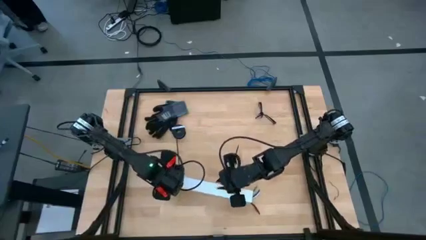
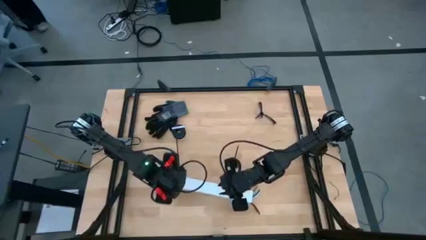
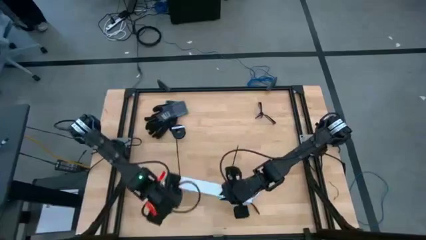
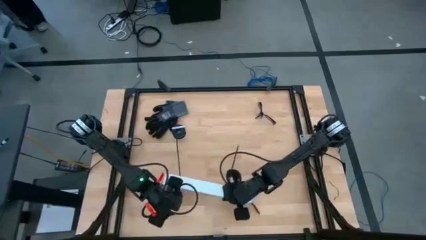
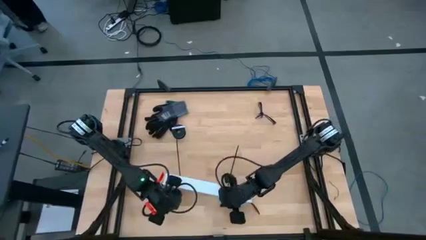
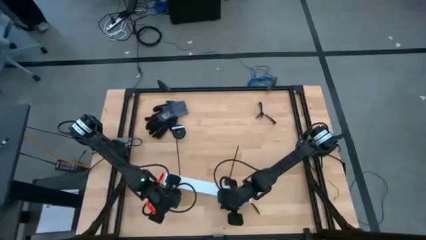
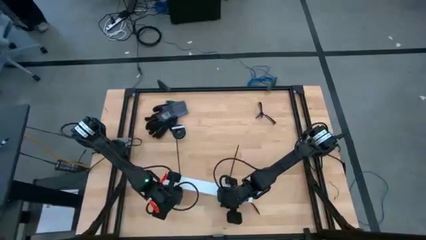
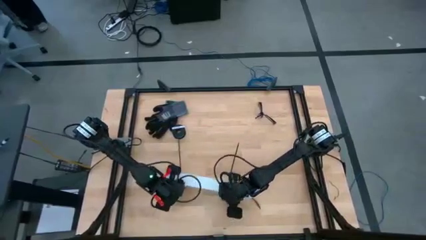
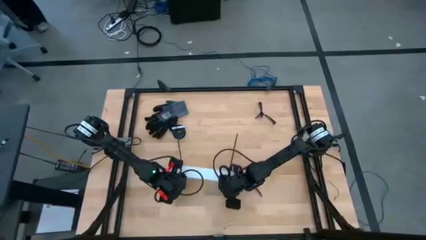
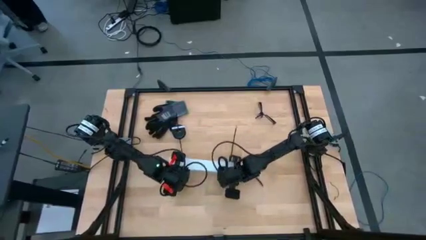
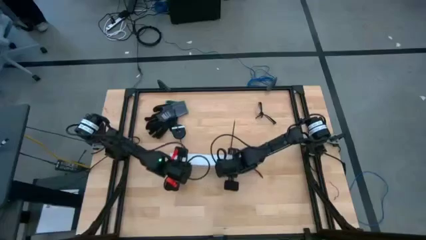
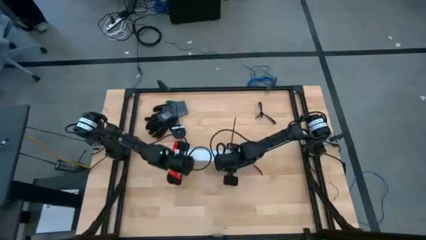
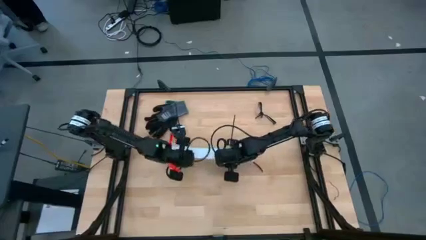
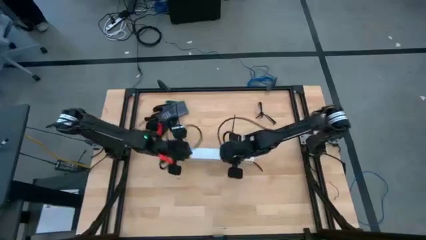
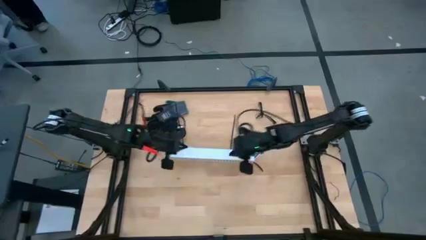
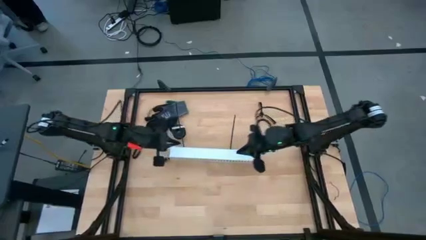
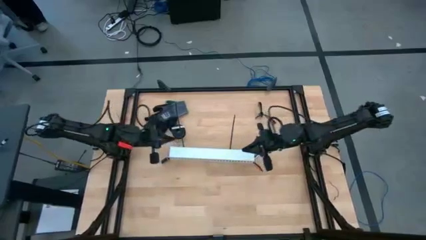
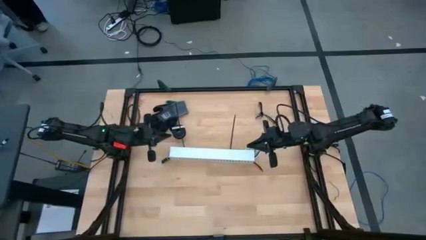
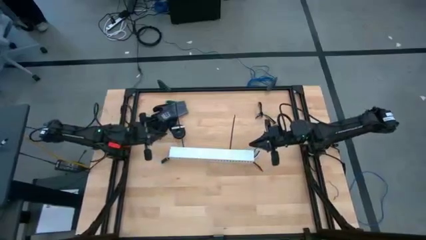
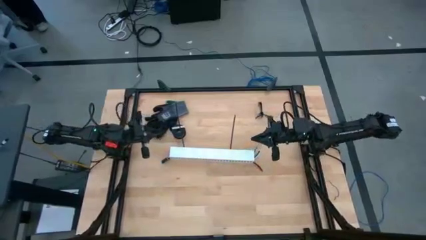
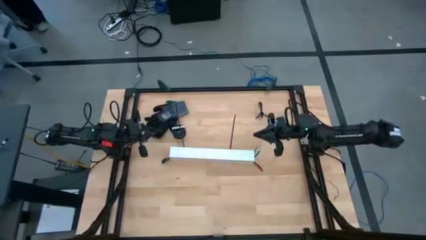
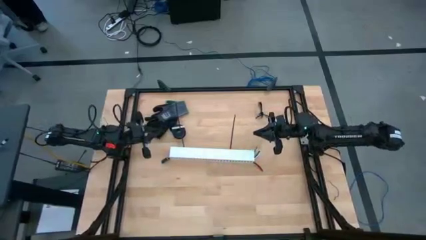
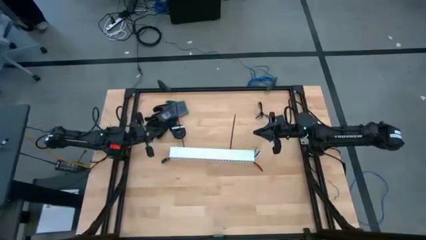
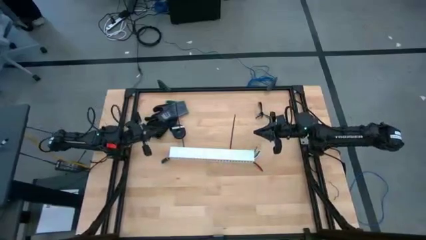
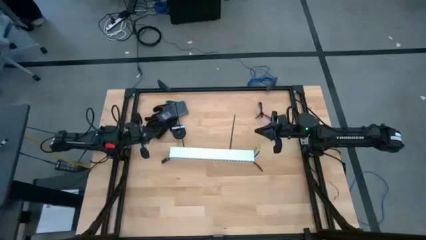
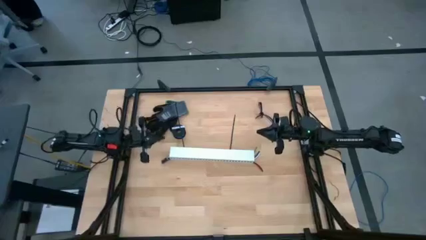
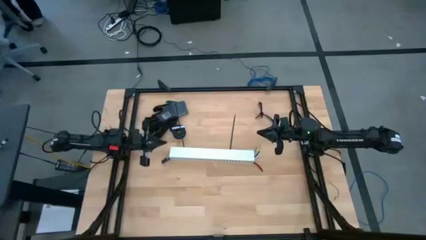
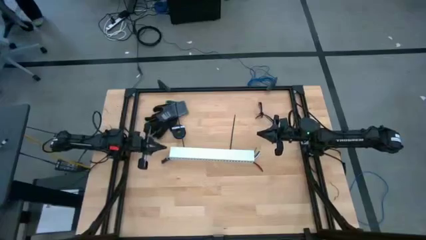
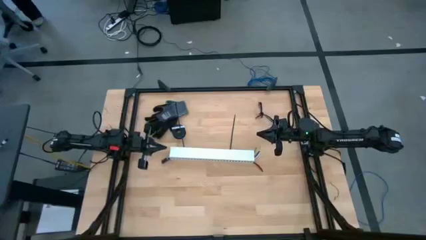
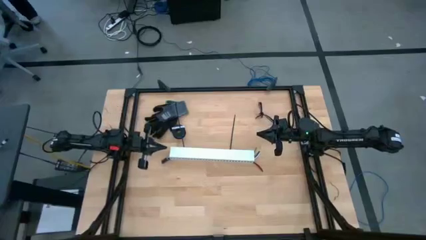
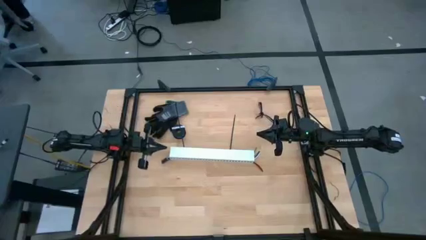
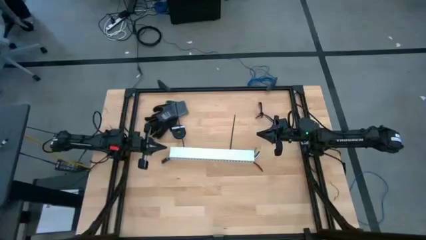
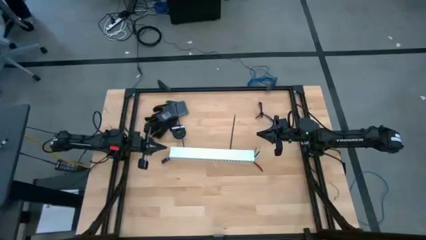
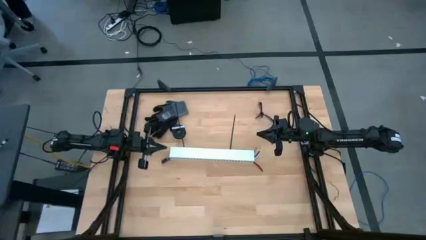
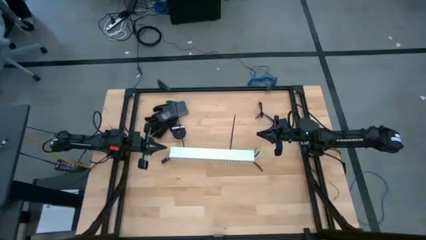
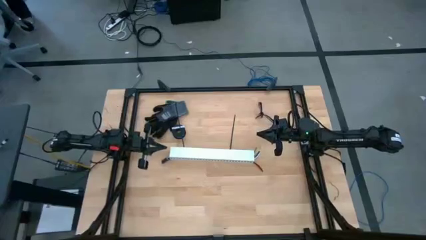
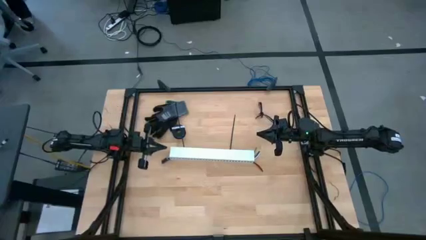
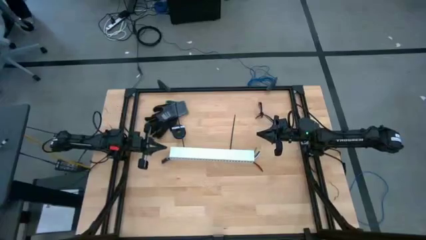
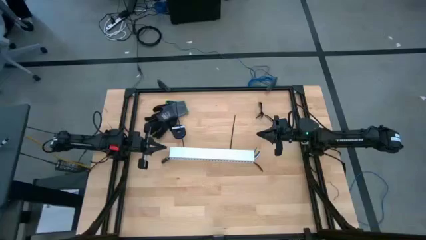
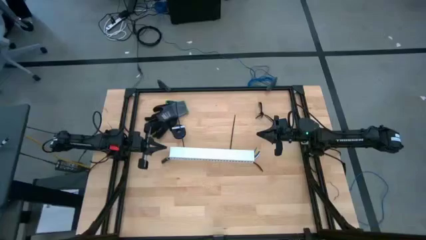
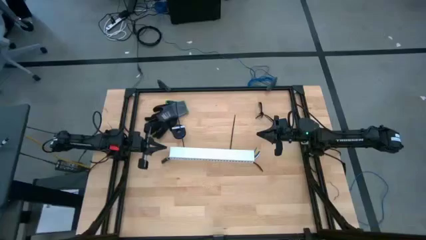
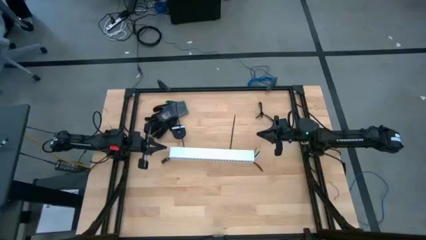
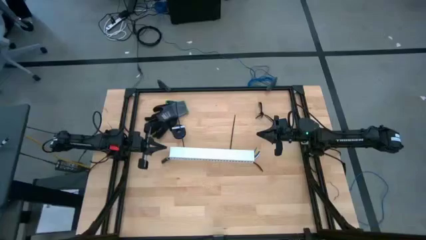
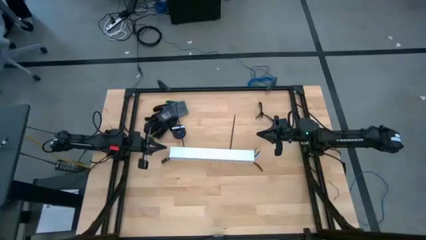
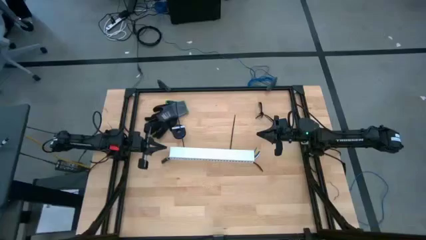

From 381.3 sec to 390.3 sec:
Task: Ziptie cables
Return to Home Position

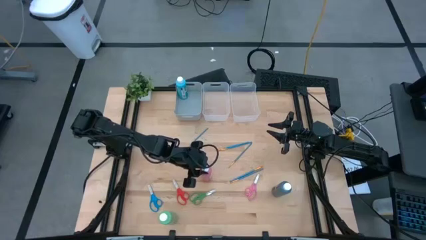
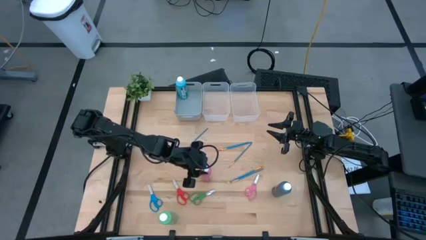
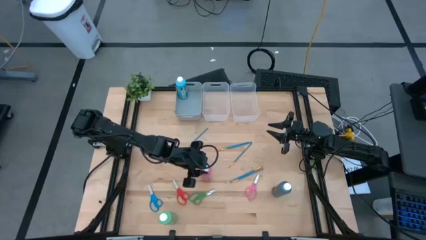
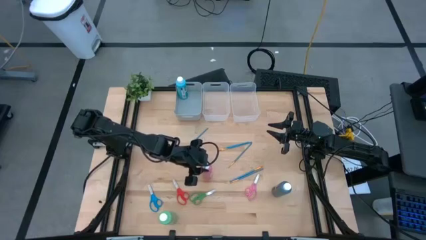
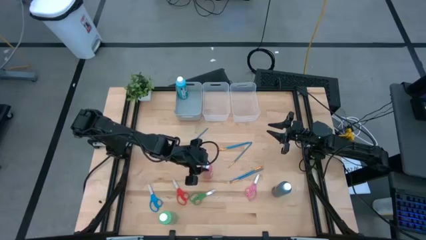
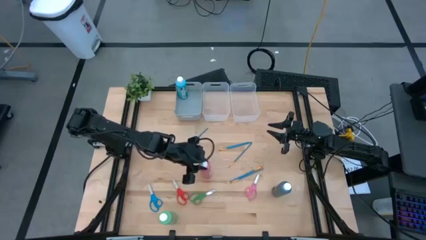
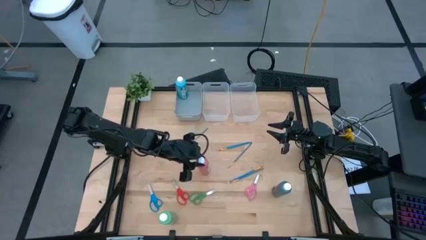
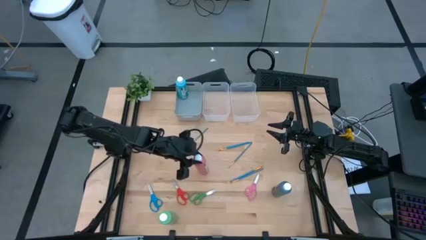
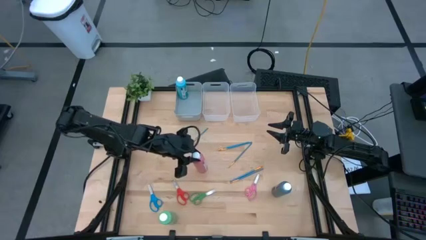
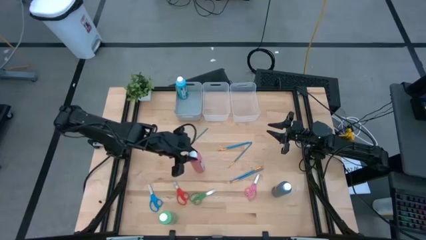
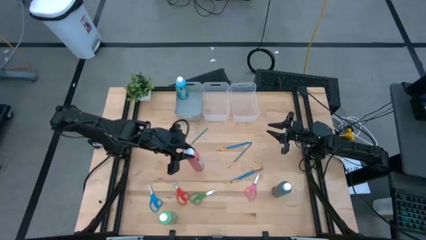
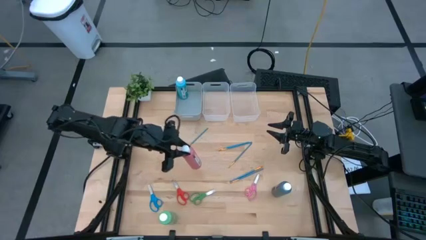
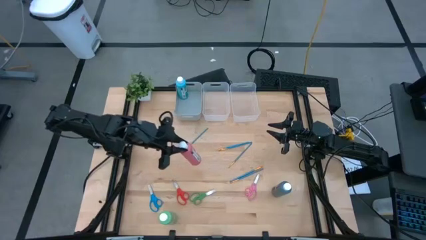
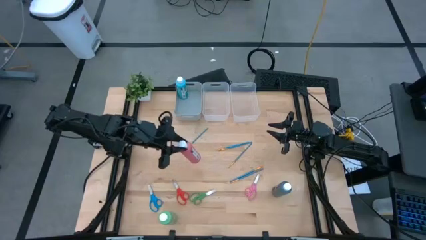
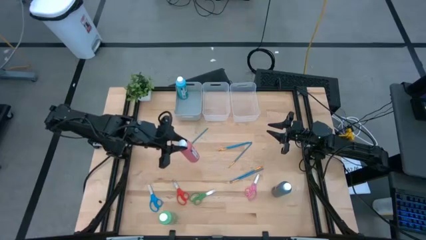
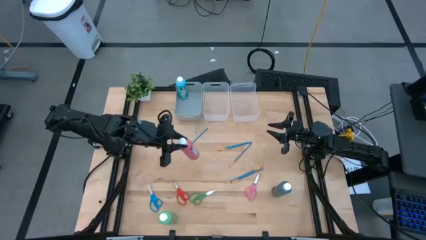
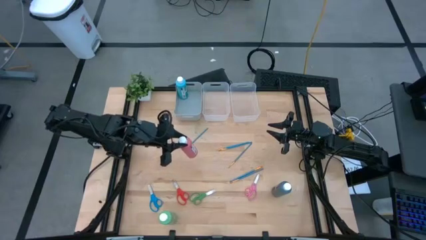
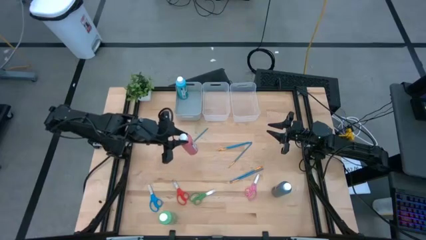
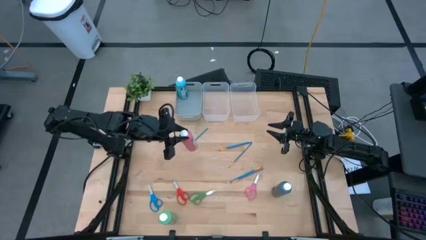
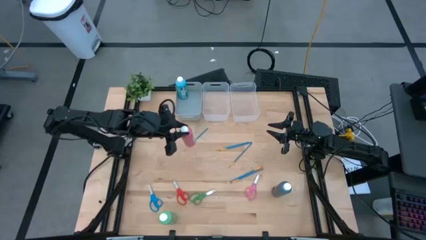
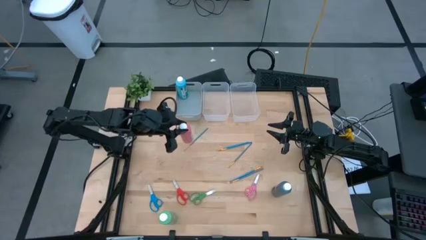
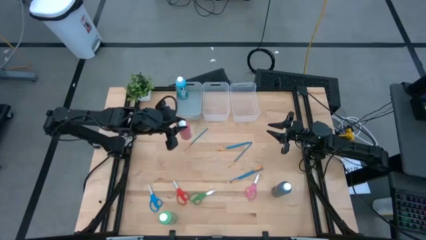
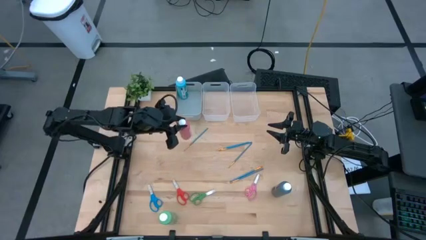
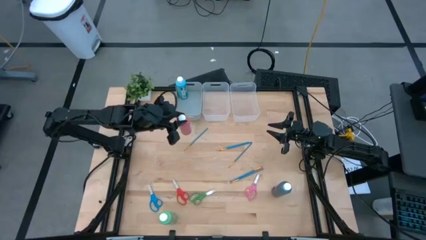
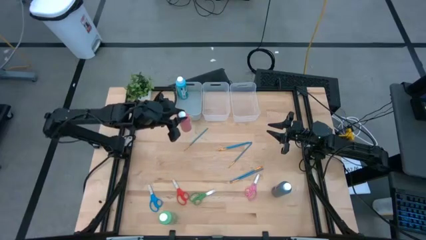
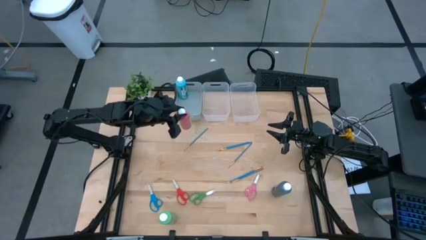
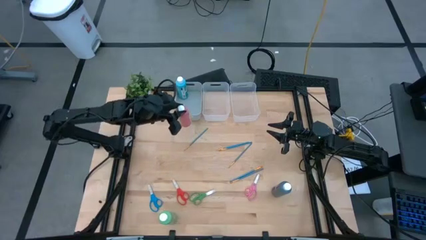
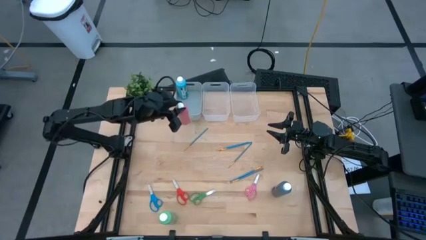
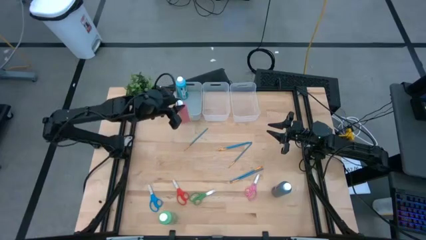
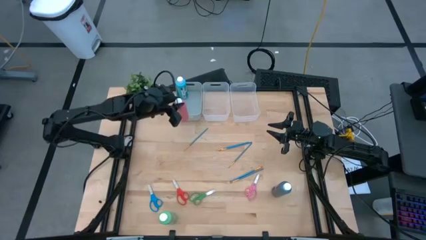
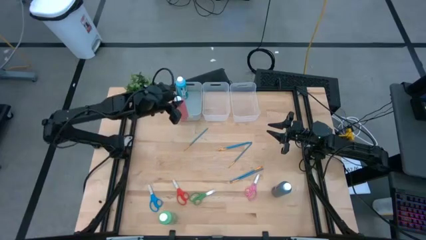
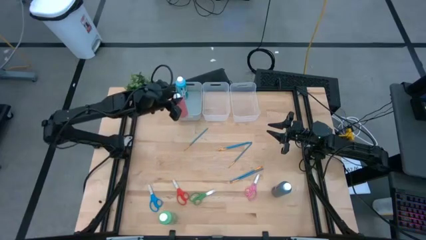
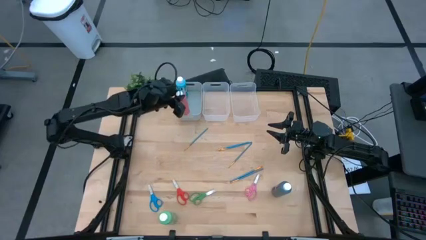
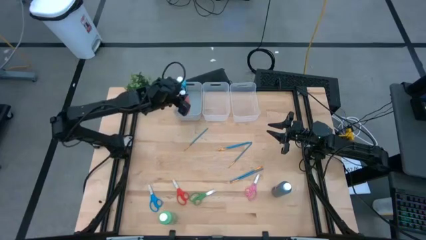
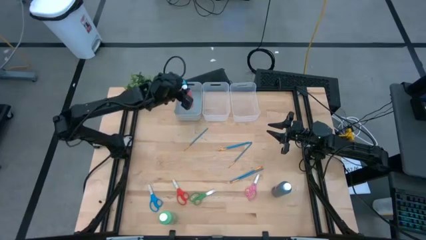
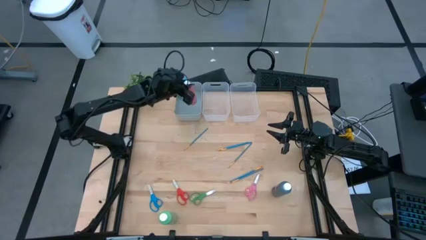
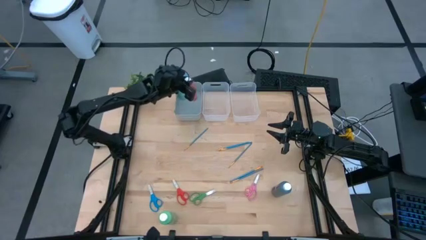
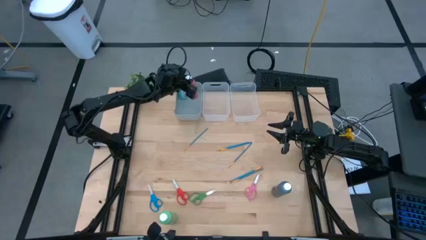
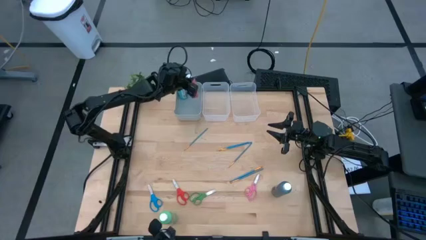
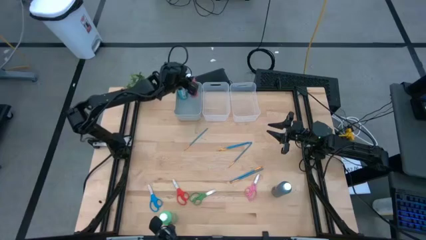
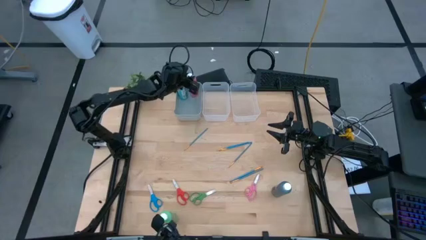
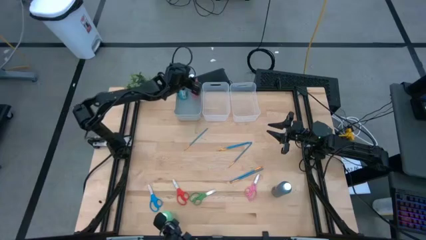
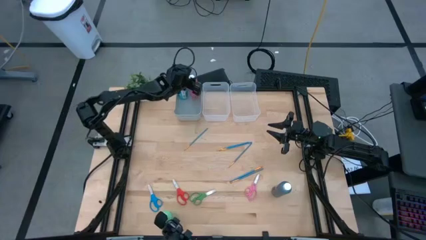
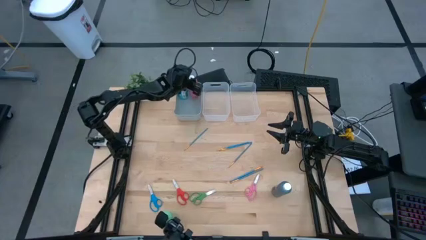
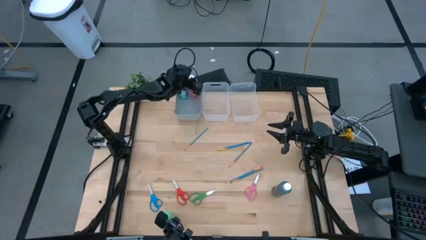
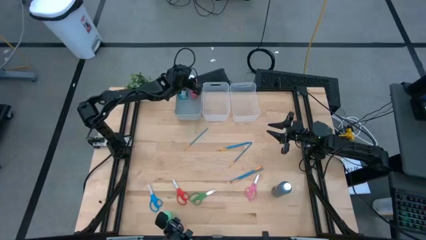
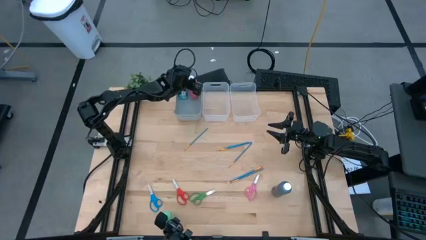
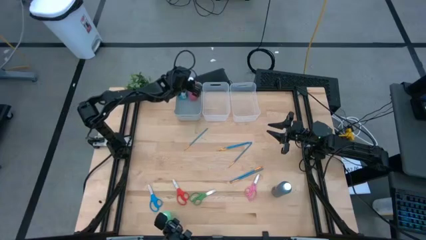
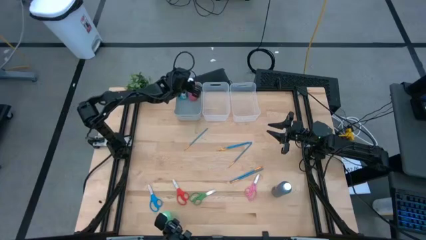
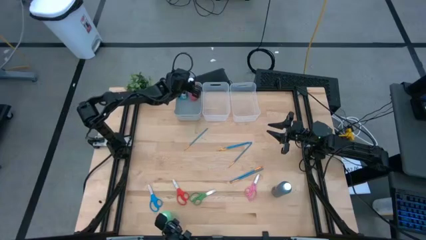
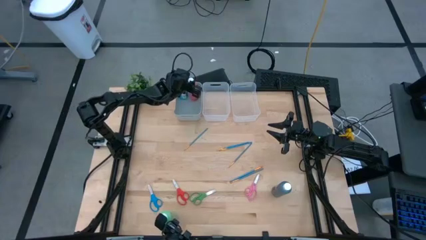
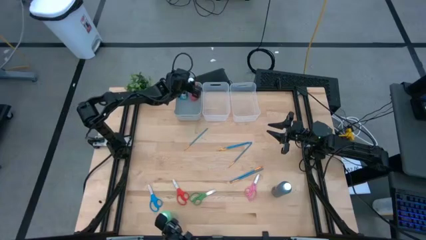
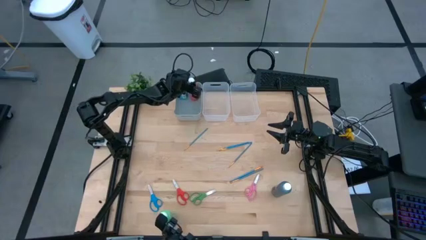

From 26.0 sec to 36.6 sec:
Task: Pick & Place Paint Supplies
Put the pink paint bottles into the gray bin
